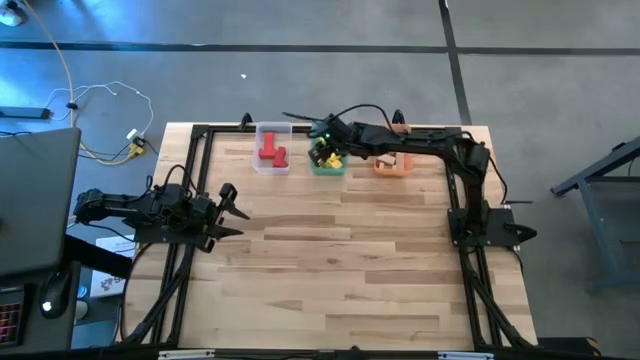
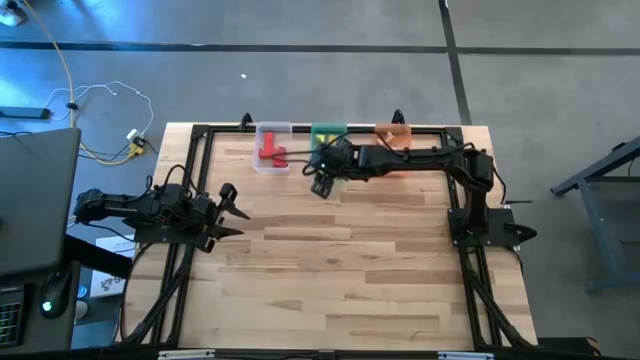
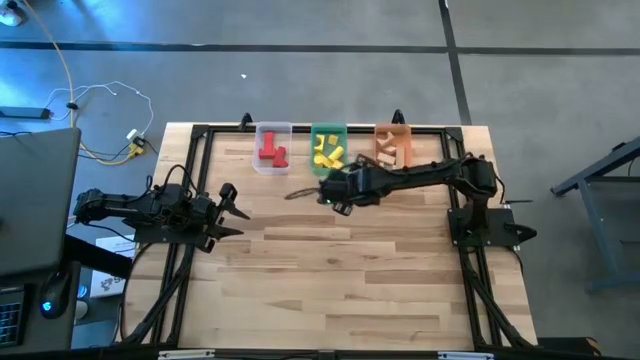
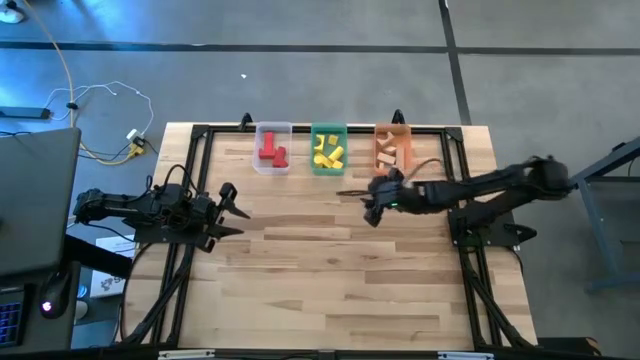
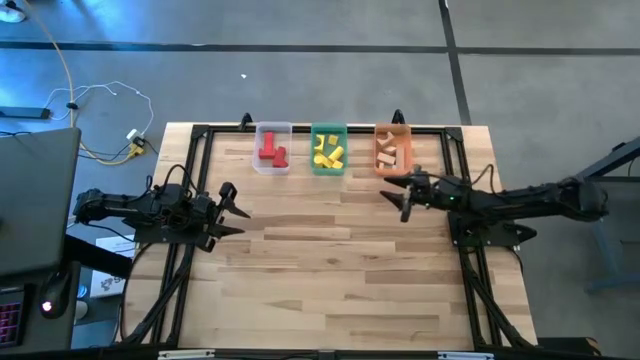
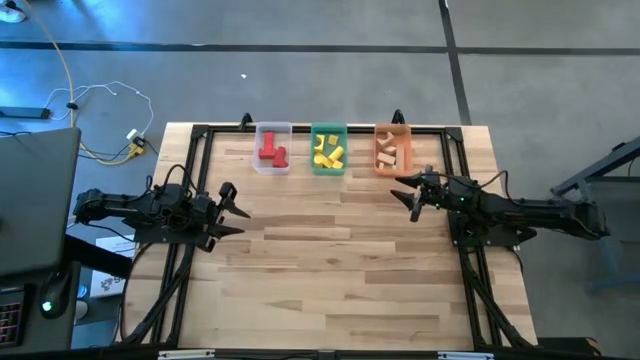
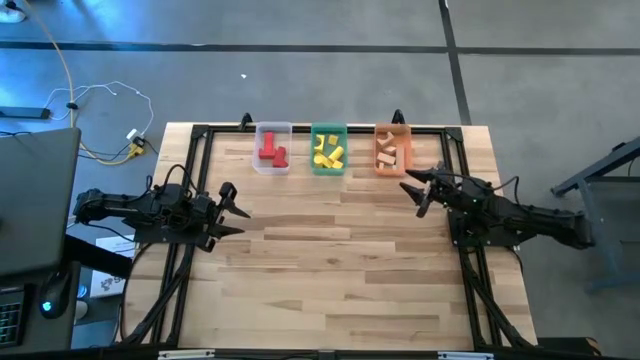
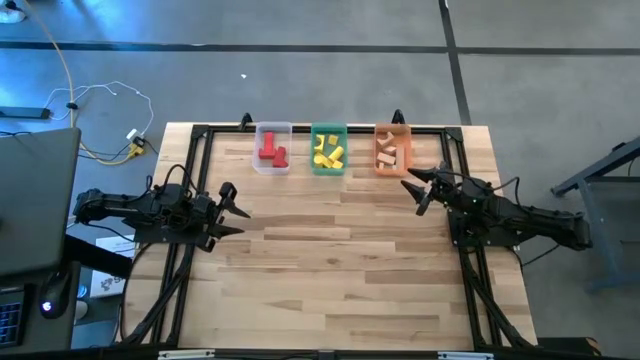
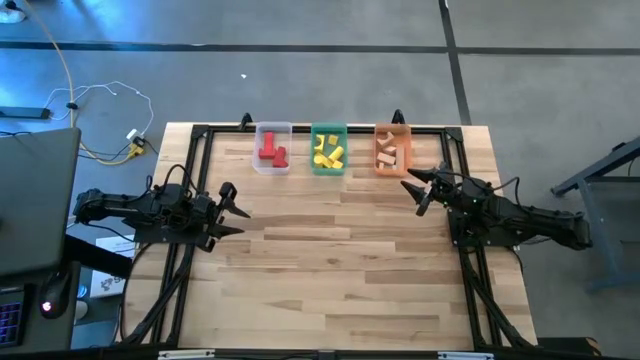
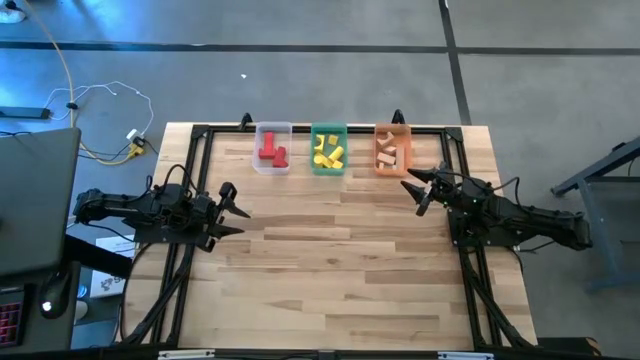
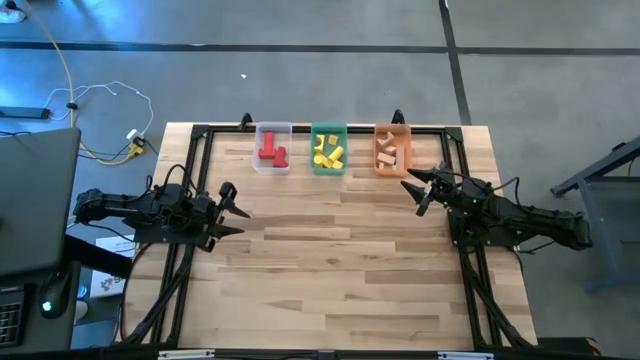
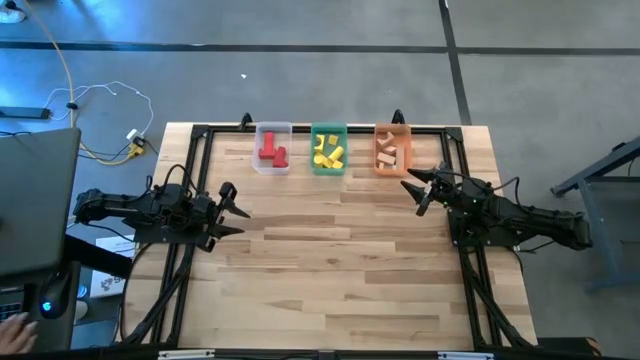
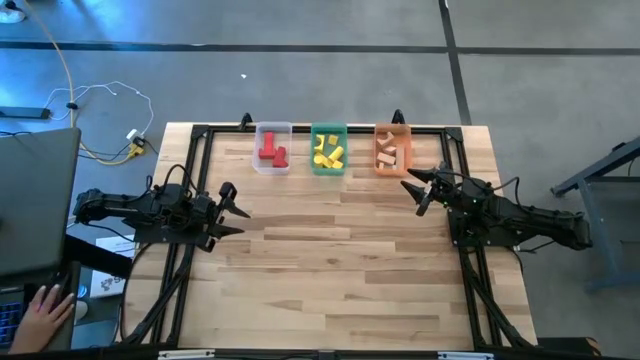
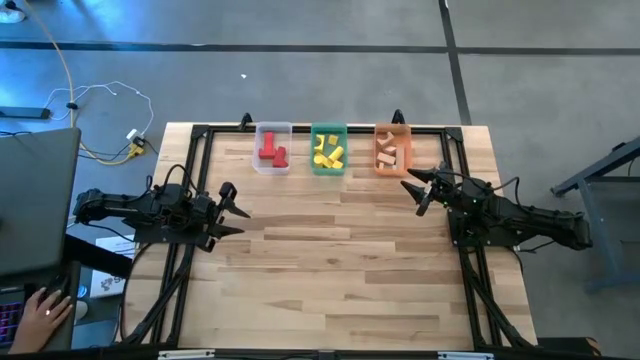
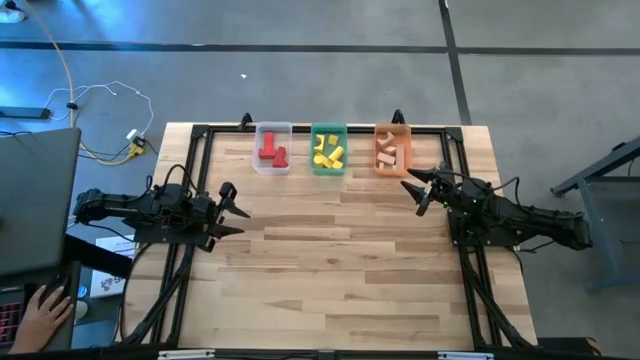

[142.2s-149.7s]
Task: Sort & place blocks by color
Return to Home Position

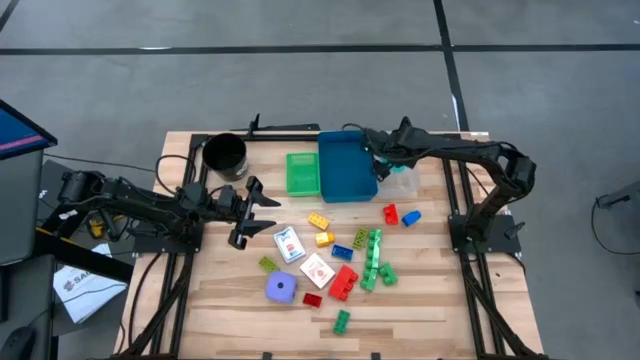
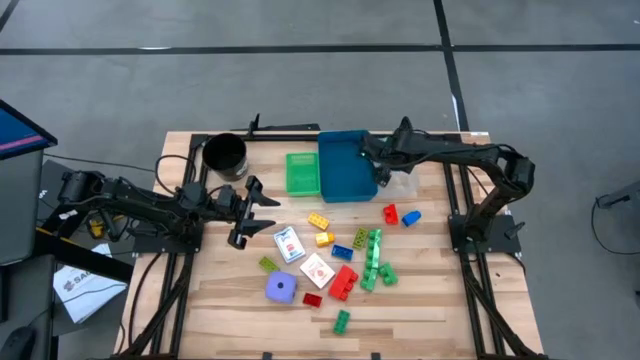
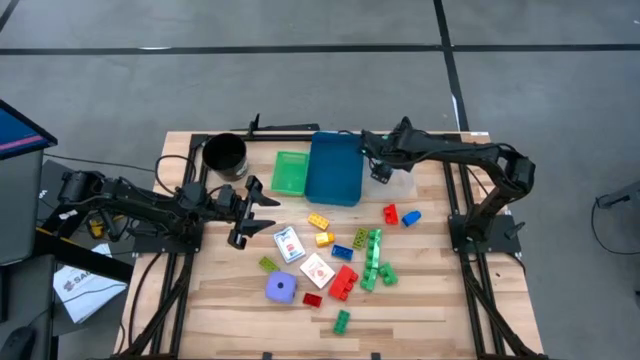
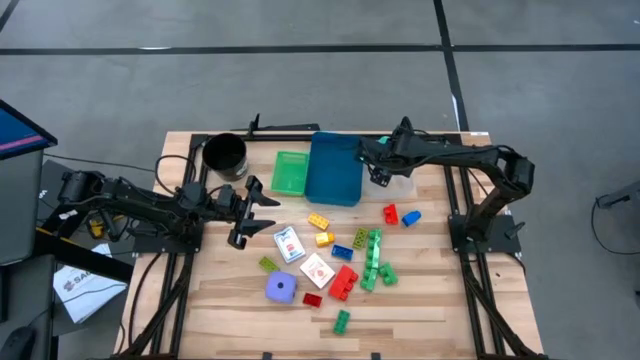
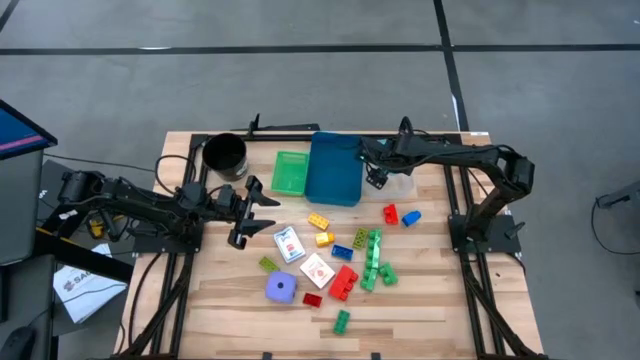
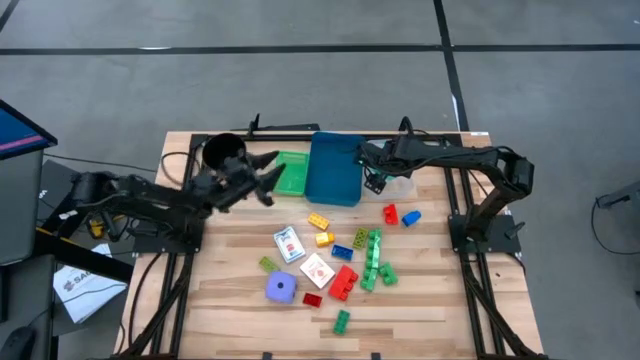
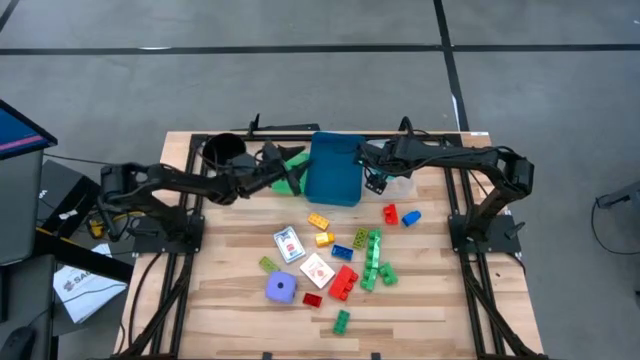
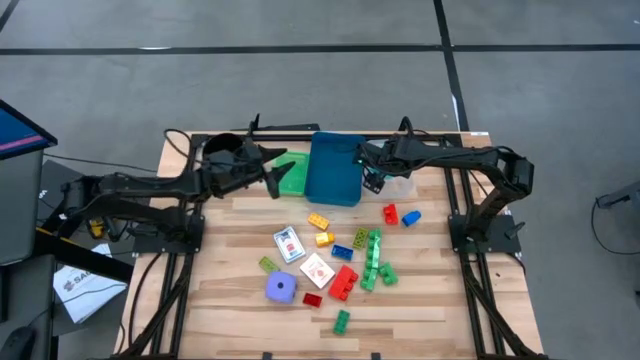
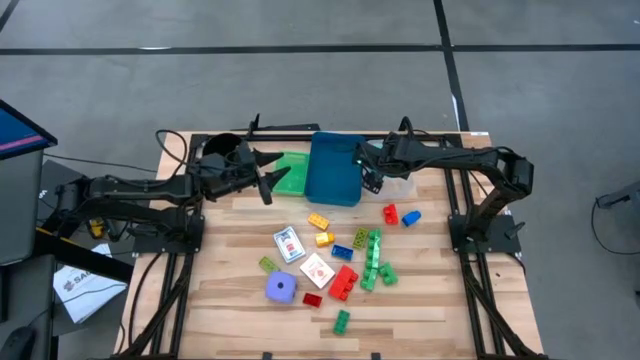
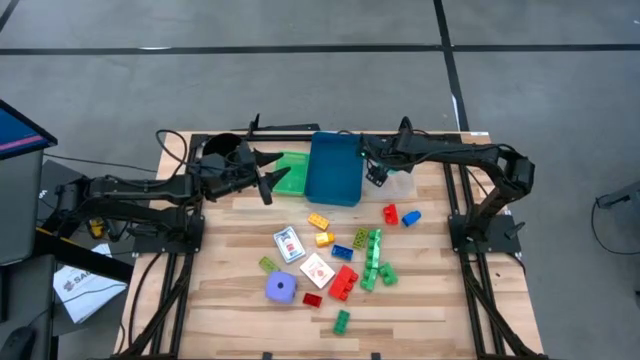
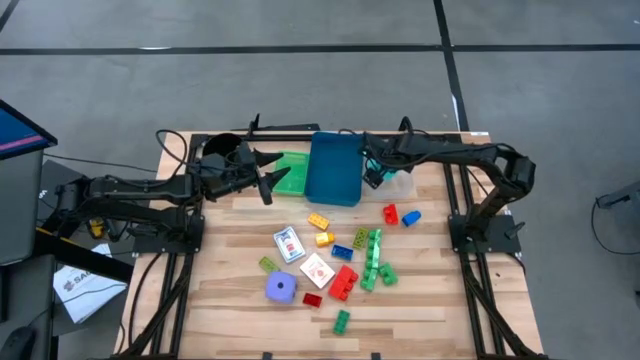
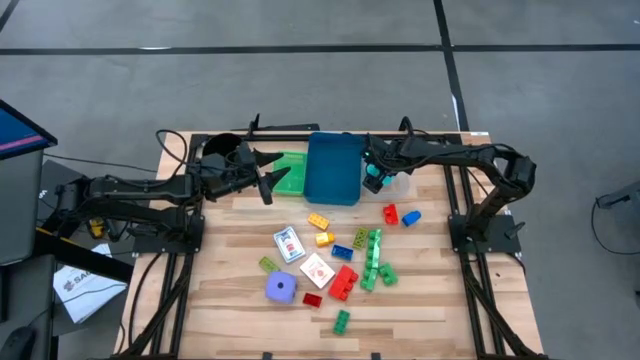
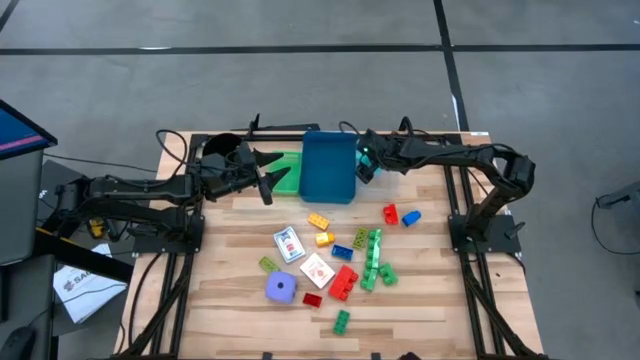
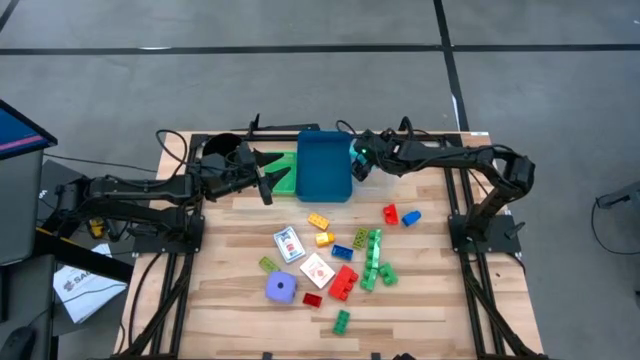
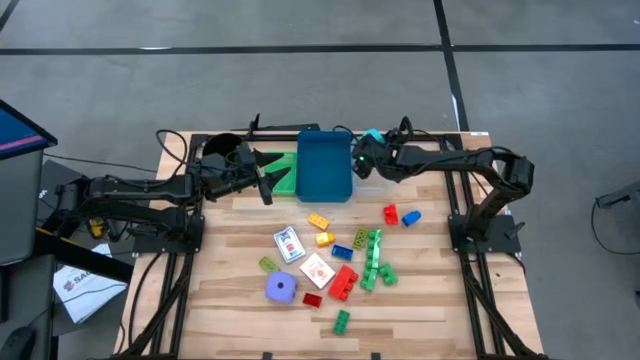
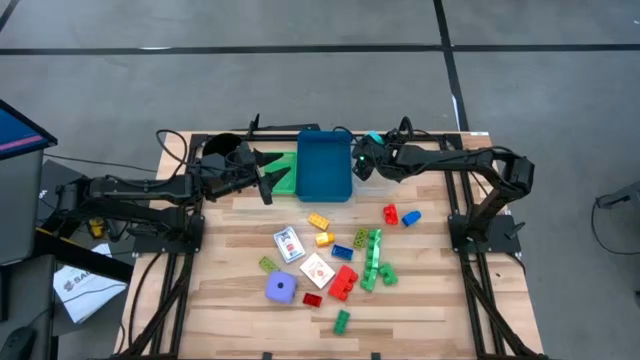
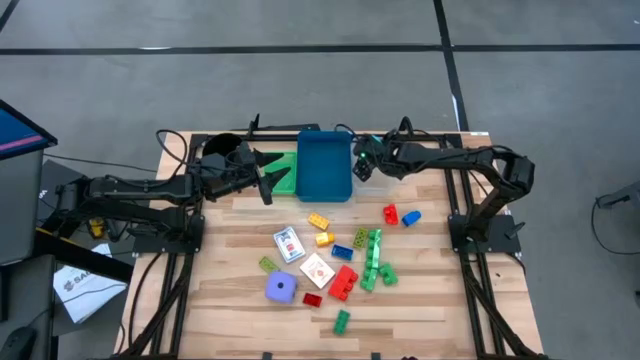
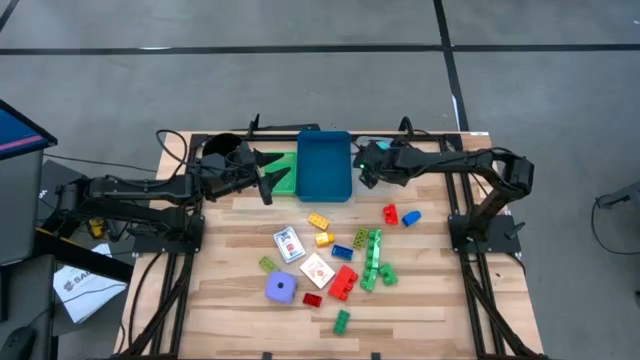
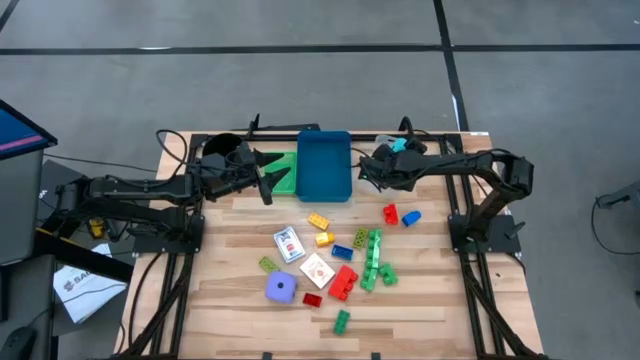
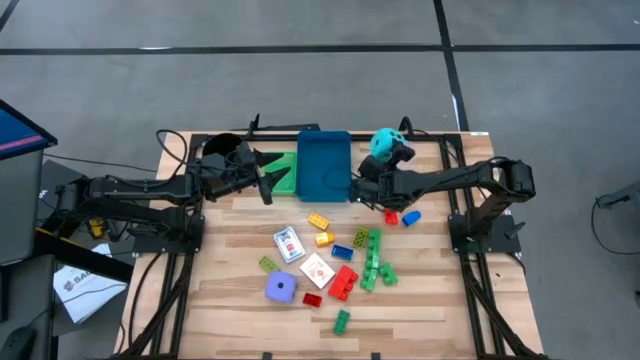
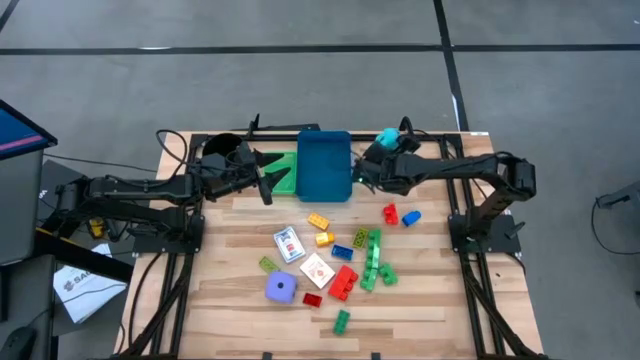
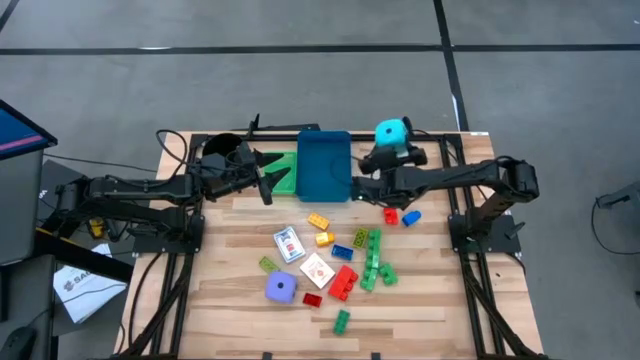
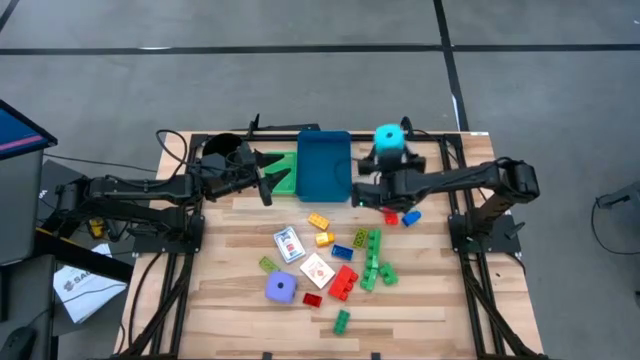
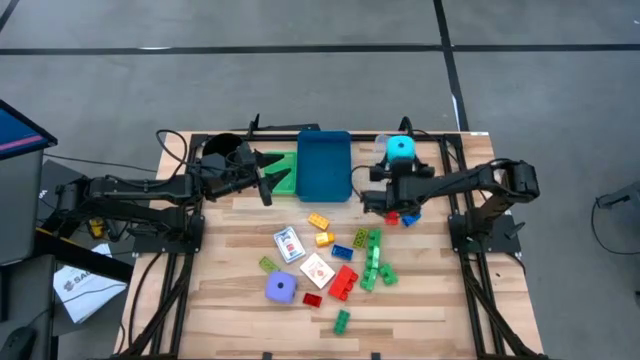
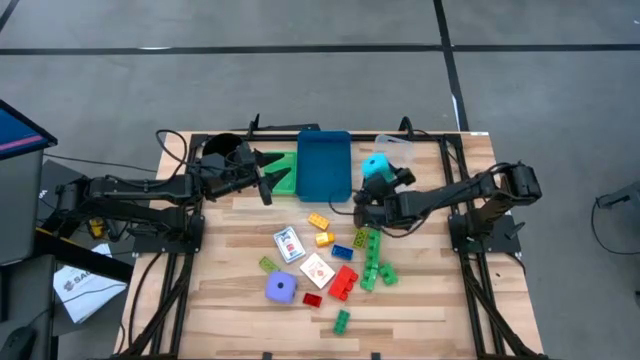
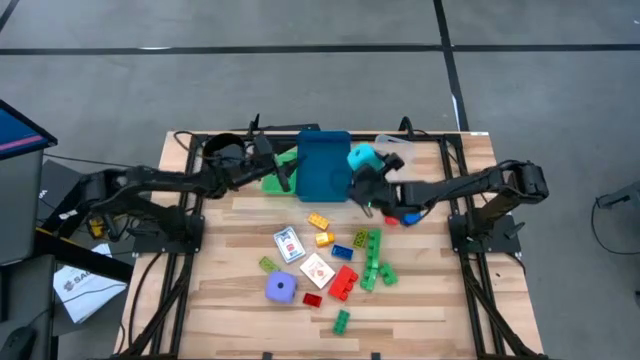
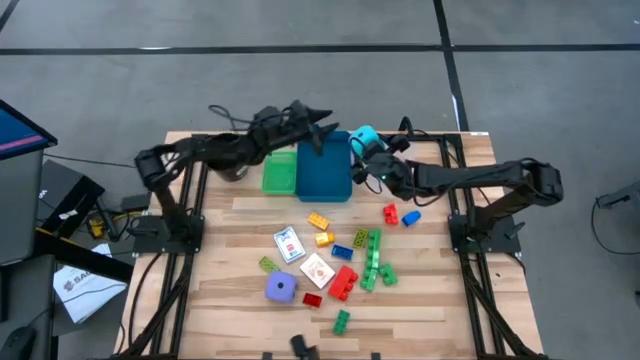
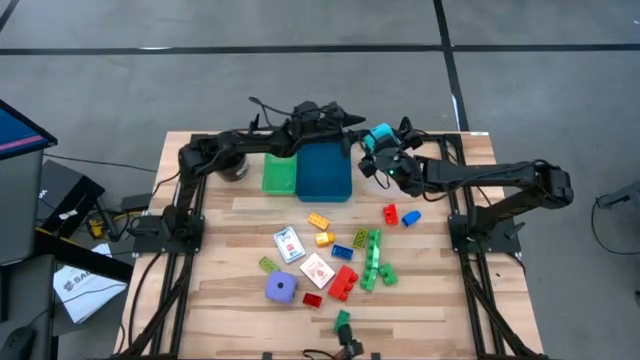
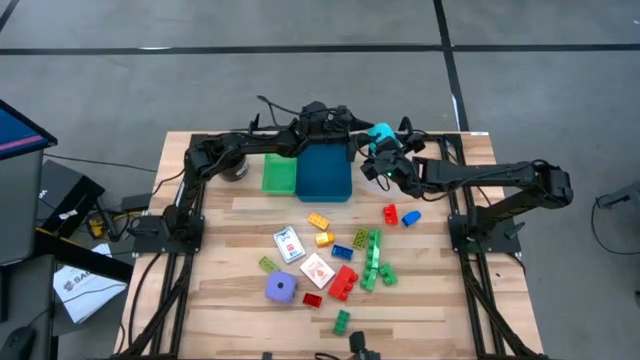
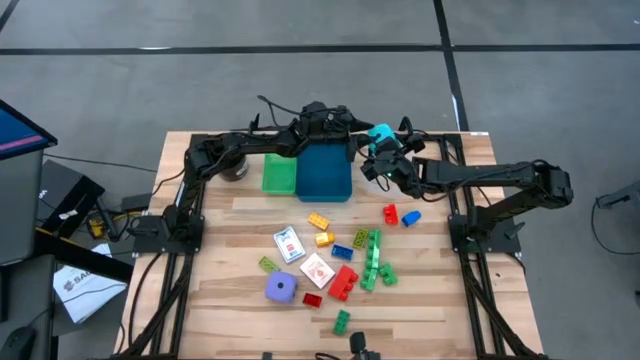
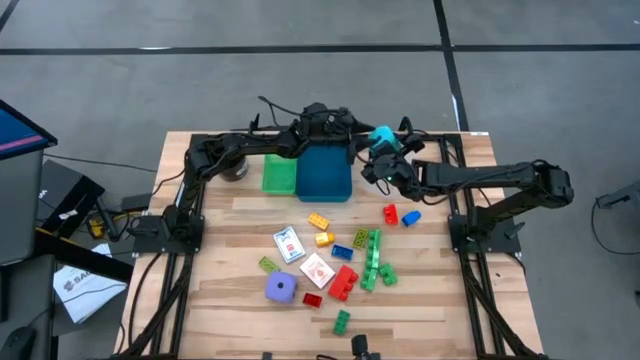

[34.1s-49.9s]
Task: Pick & Place Toys
Put the light blue dice into the transparent bin
